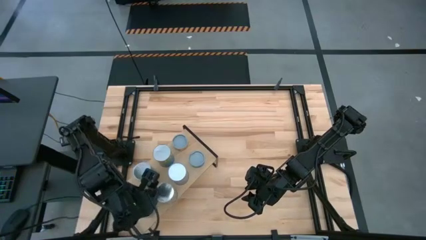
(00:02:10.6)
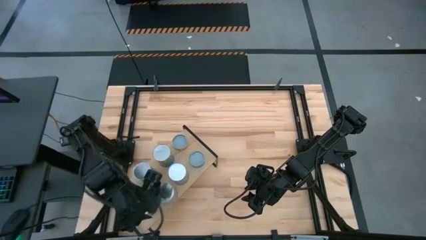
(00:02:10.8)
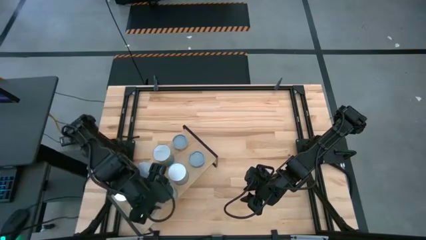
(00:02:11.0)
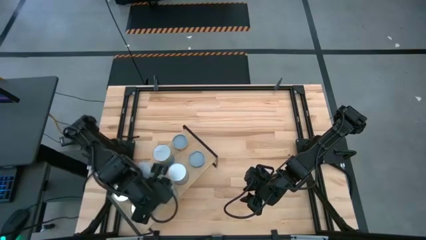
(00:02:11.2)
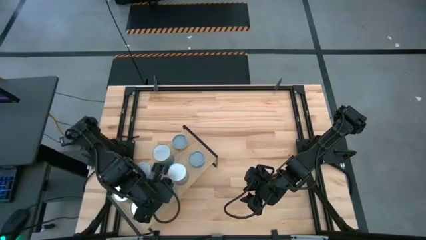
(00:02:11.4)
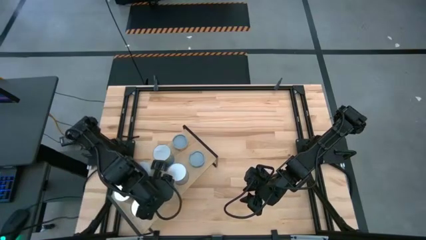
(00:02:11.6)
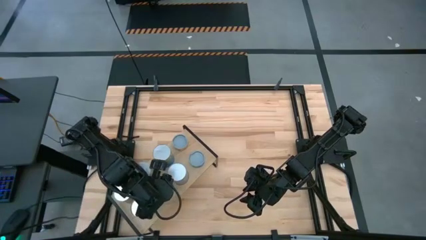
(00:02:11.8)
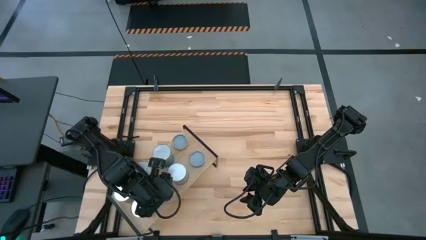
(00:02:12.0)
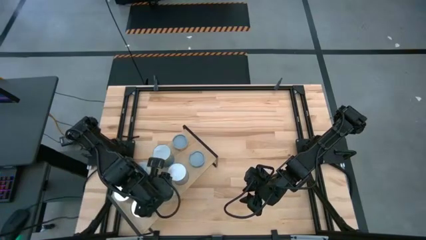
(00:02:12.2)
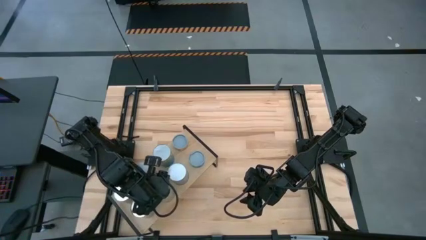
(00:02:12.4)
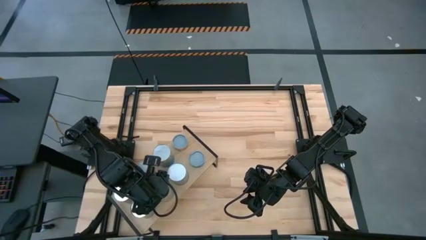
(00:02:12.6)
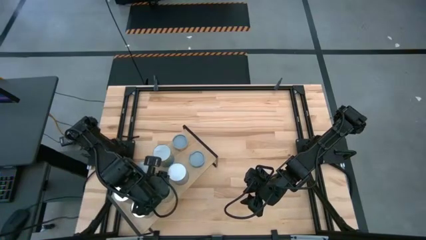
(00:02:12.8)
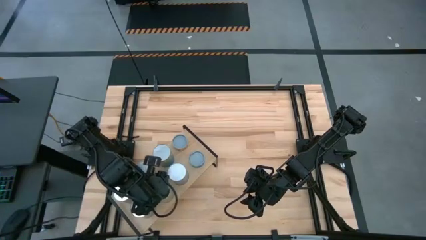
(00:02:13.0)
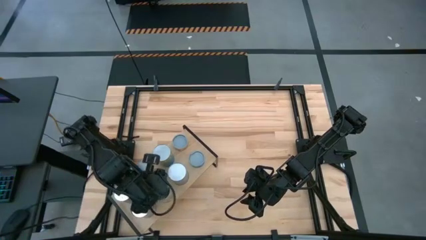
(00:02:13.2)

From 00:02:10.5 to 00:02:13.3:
Task: Pick and place cans onto a shelf
Adjust the canned peaches on the shelf

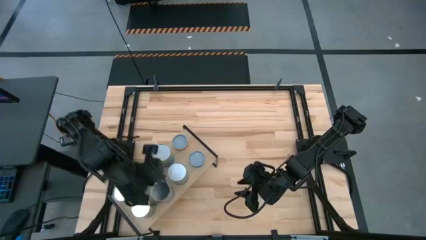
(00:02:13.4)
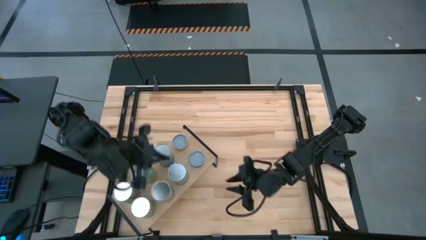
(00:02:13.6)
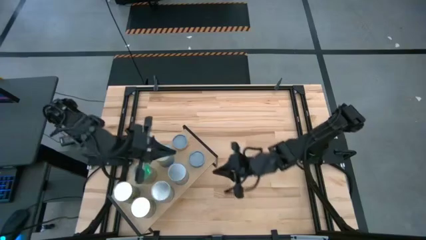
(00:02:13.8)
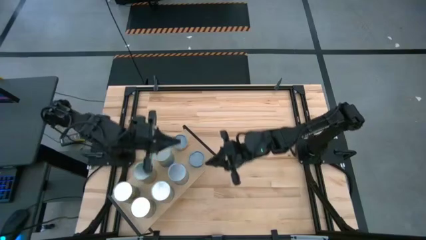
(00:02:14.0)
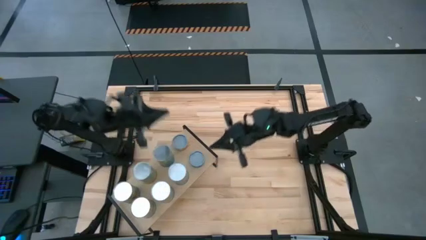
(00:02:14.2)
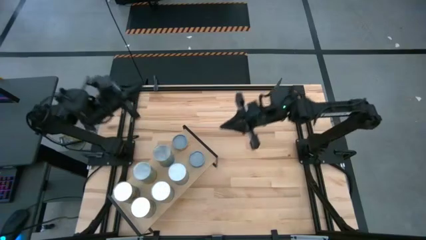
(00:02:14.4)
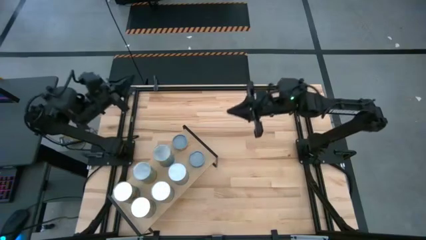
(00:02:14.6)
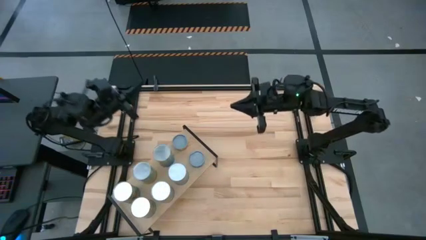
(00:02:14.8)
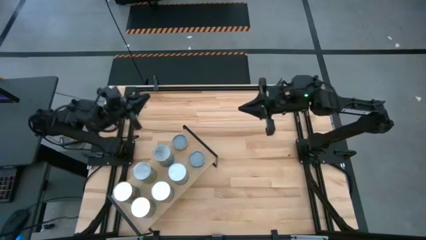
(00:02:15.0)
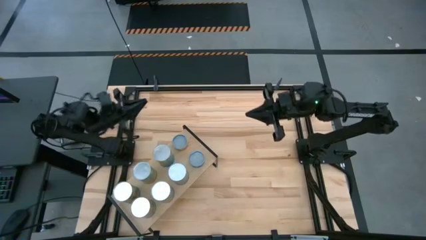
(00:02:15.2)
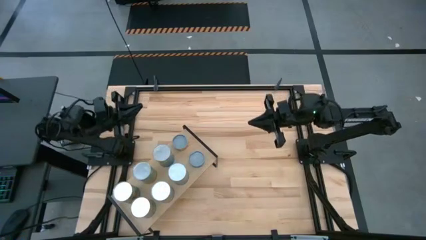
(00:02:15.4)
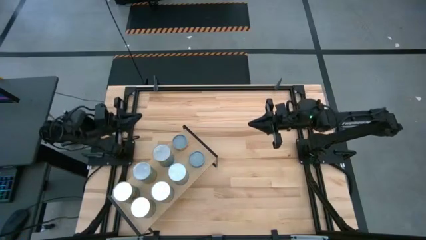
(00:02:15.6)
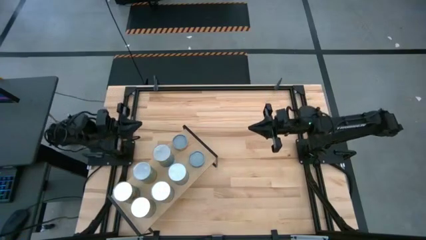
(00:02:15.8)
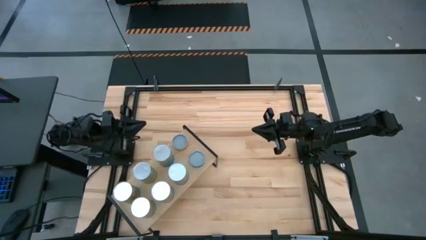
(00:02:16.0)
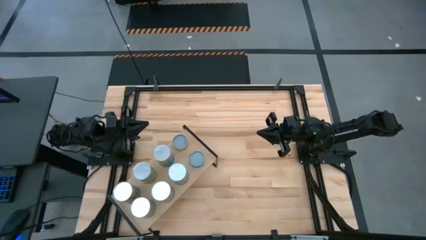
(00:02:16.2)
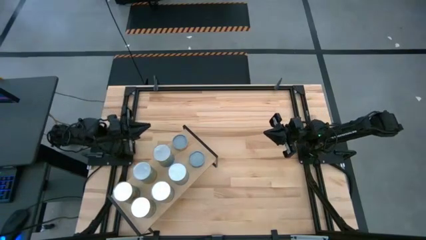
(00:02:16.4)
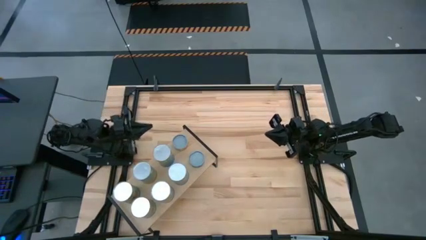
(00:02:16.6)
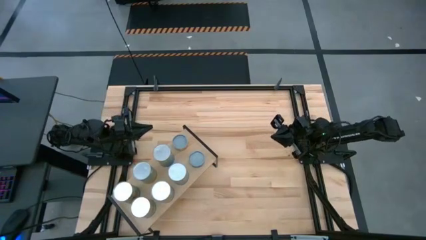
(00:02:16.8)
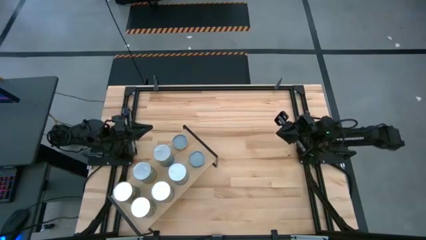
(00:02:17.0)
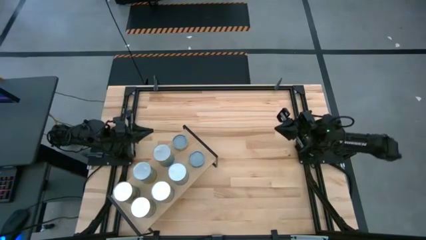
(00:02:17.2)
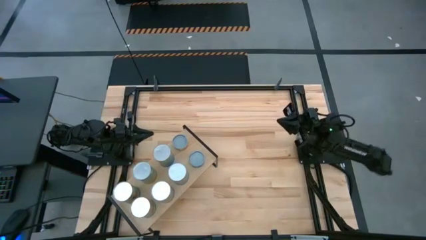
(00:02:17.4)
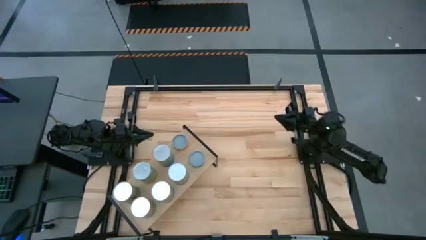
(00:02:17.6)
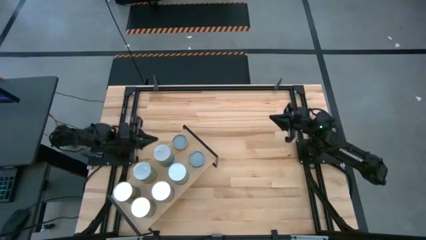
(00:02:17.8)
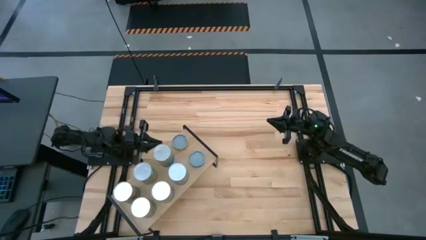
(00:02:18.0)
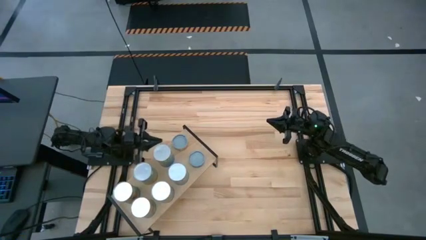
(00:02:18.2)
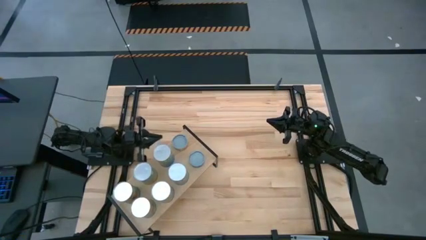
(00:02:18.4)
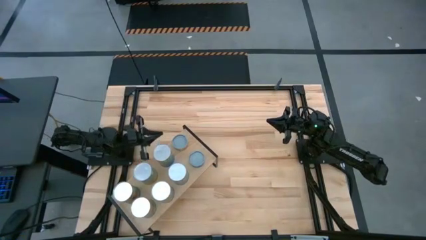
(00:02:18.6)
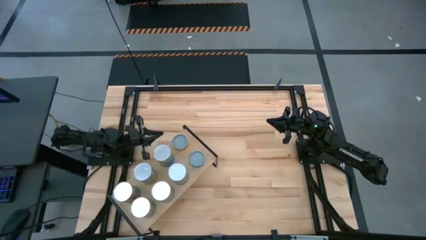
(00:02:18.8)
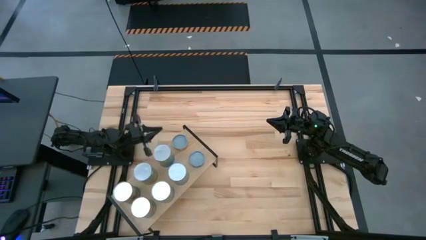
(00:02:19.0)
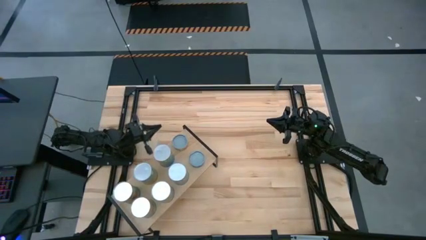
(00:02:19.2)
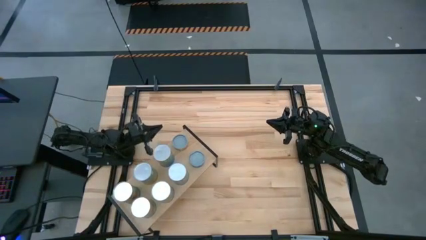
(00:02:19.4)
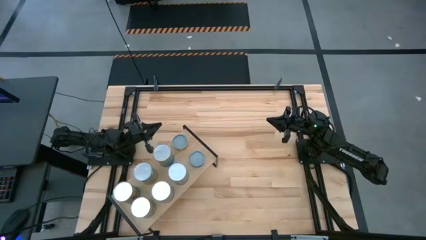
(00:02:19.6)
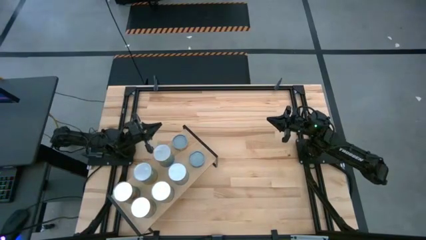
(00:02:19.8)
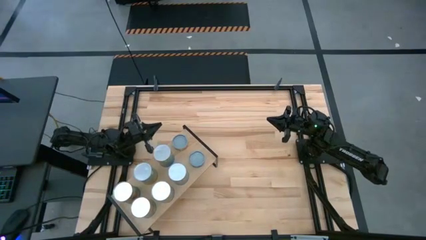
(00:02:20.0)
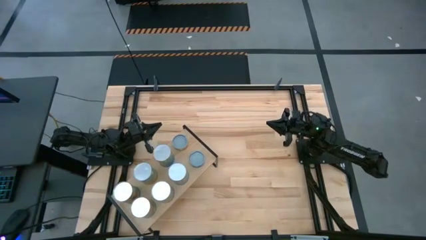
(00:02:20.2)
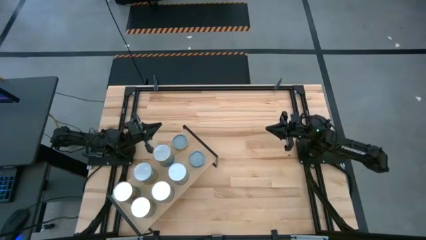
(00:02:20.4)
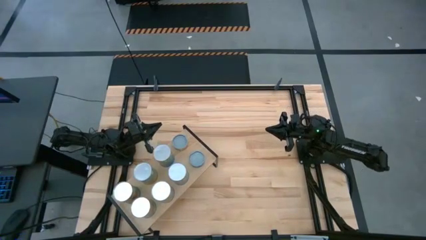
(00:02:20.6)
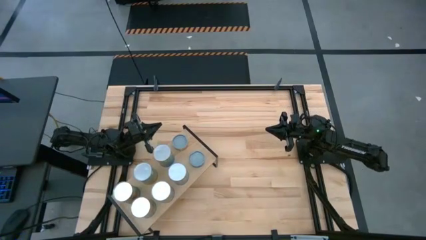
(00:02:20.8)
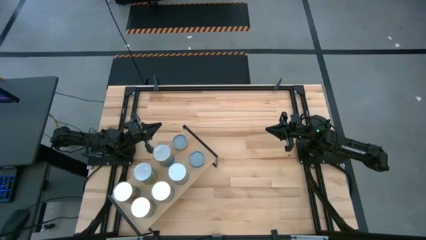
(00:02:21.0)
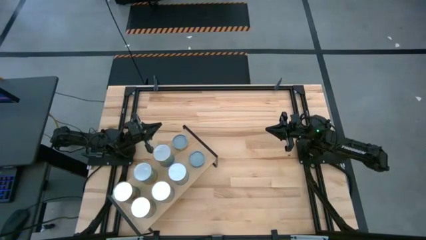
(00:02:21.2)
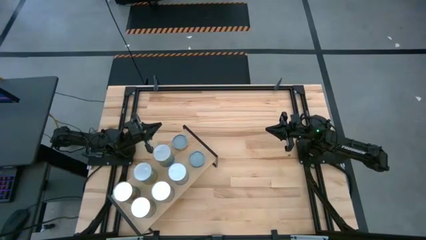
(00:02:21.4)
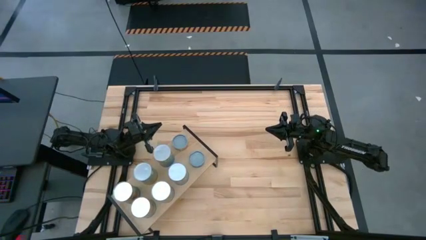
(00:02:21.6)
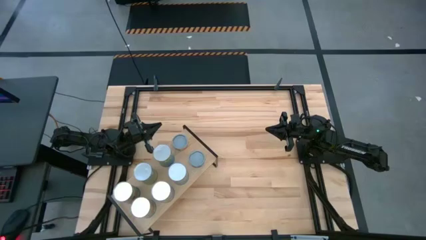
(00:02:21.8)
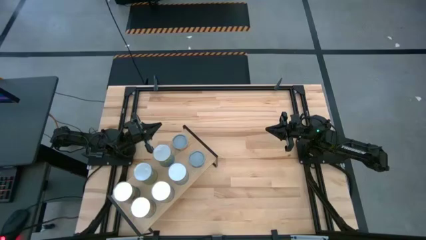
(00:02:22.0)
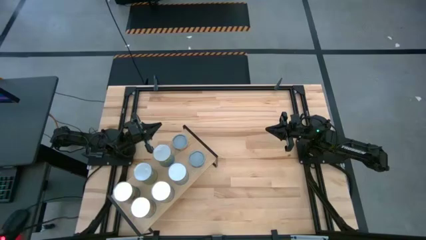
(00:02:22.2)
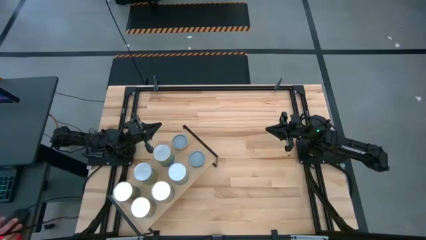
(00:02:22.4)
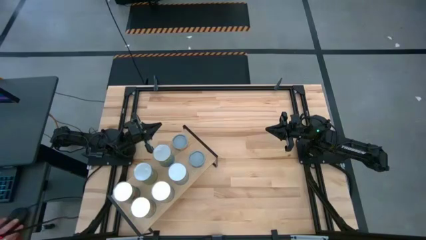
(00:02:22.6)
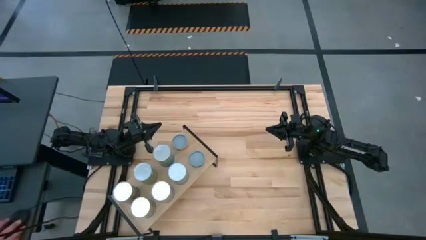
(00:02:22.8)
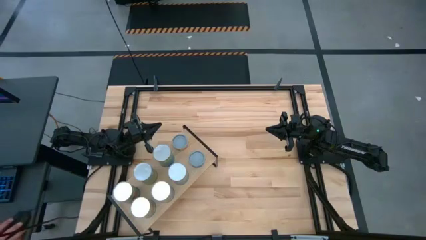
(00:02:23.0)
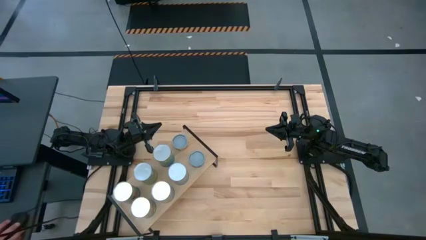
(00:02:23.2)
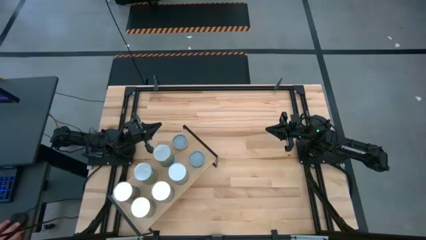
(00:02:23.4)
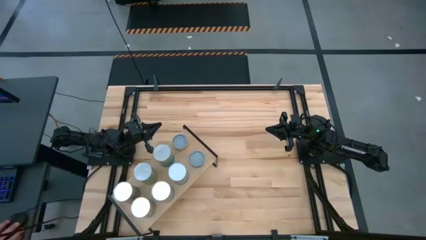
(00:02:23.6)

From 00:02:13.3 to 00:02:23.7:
Return to Home Position

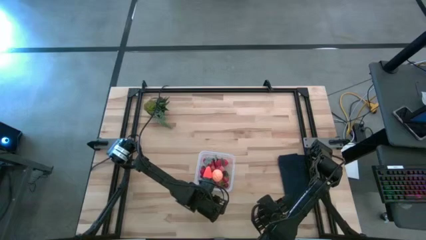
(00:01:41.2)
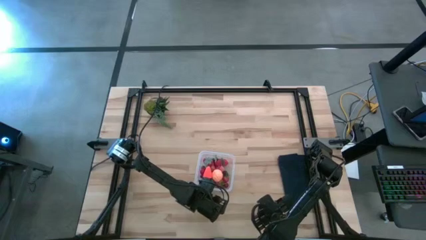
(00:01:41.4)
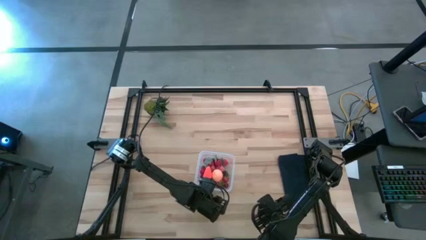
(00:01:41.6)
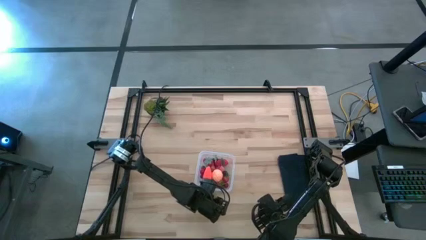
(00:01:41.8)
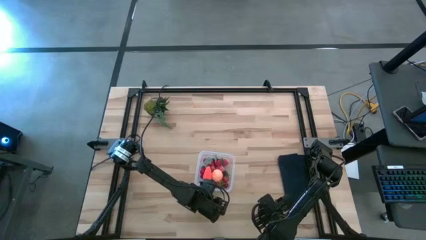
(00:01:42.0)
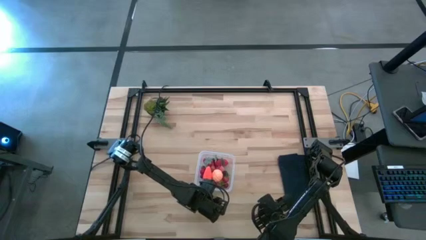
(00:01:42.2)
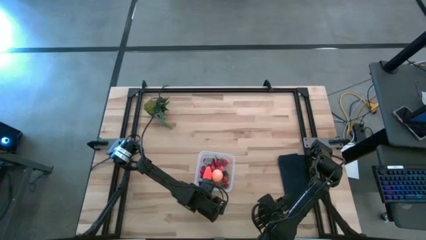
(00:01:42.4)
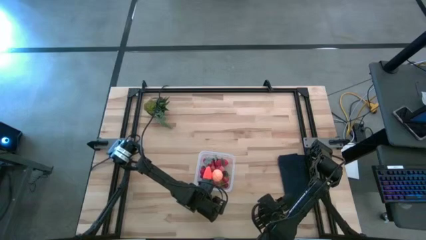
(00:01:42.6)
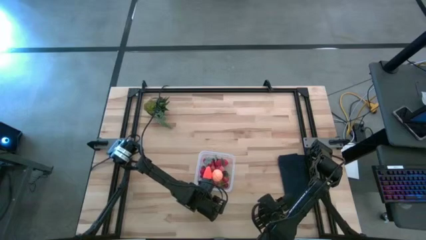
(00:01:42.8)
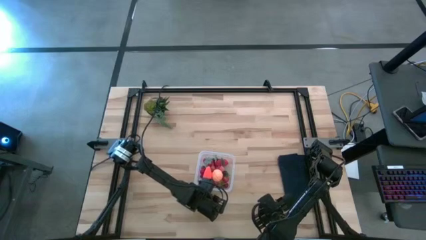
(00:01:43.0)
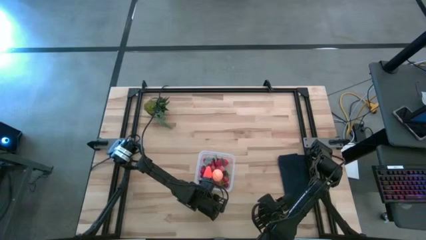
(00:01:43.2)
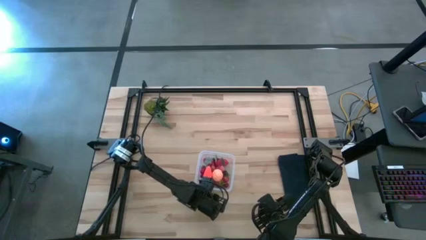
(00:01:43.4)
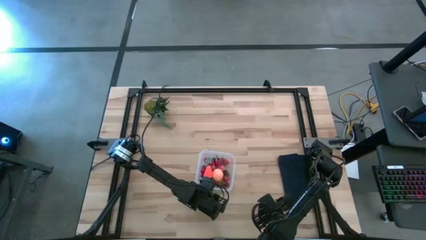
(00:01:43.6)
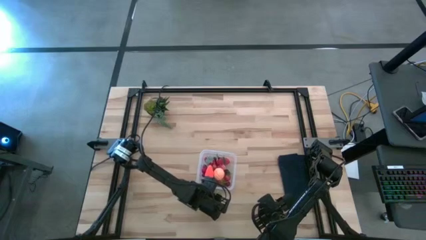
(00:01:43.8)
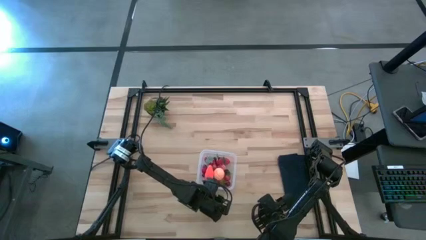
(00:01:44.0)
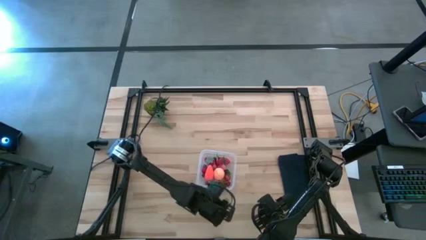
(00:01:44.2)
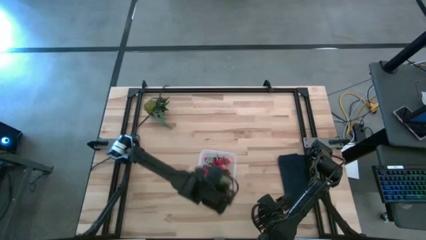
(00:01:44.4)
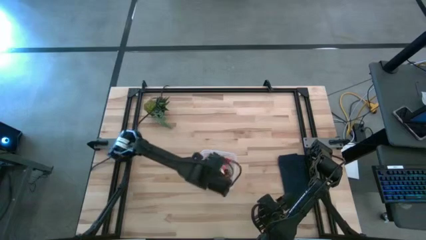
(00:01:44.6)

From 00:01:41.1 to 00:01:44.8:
Task: Pick and placing Produce into tupperware
Put the strawberry into the transparent container
